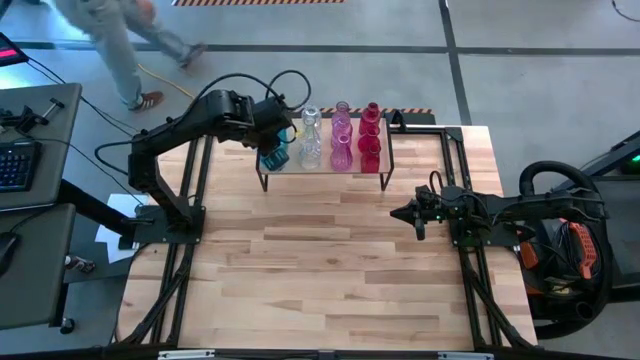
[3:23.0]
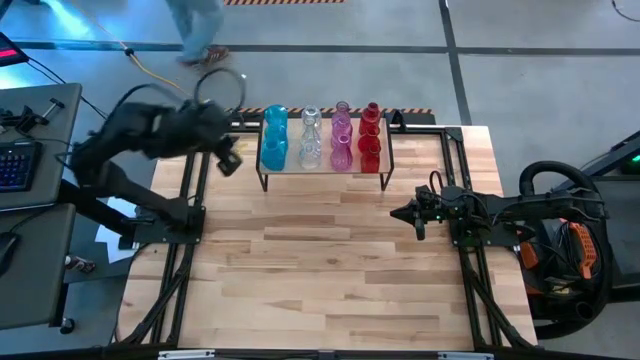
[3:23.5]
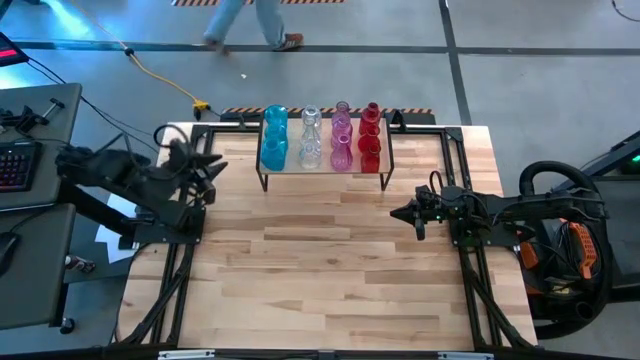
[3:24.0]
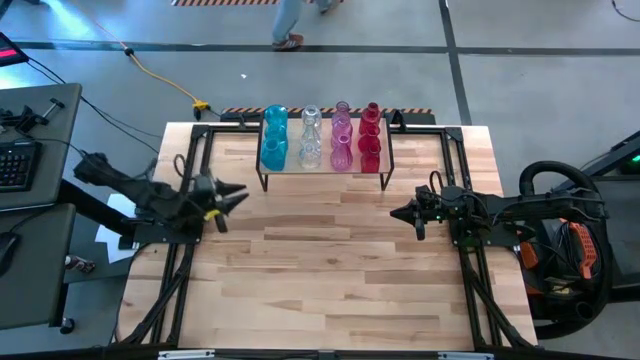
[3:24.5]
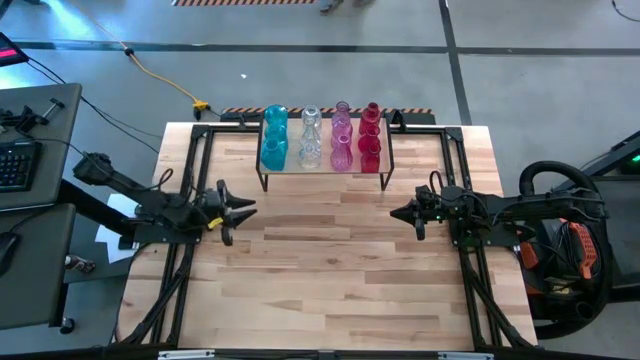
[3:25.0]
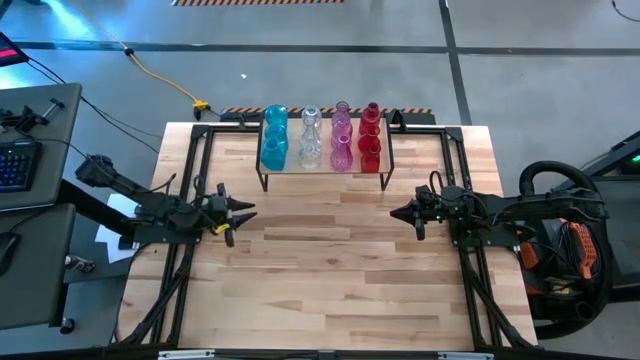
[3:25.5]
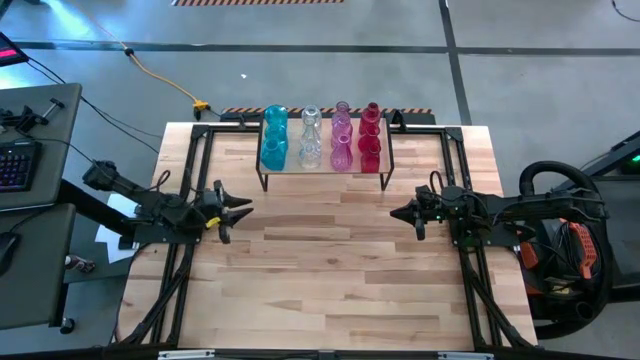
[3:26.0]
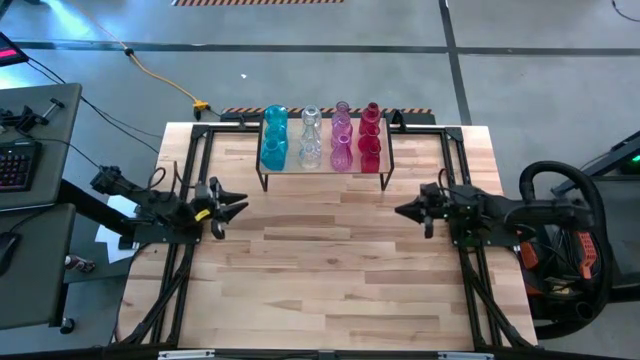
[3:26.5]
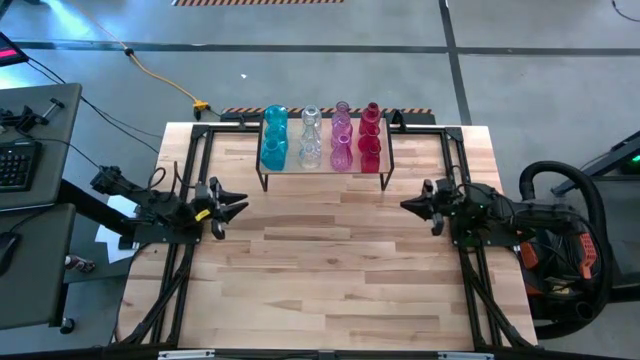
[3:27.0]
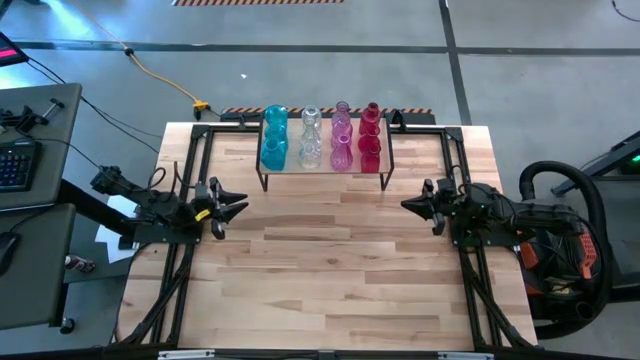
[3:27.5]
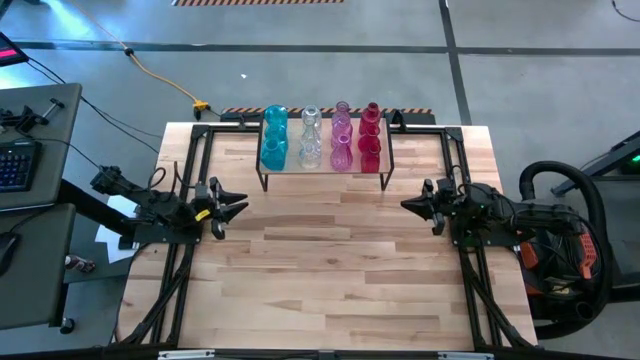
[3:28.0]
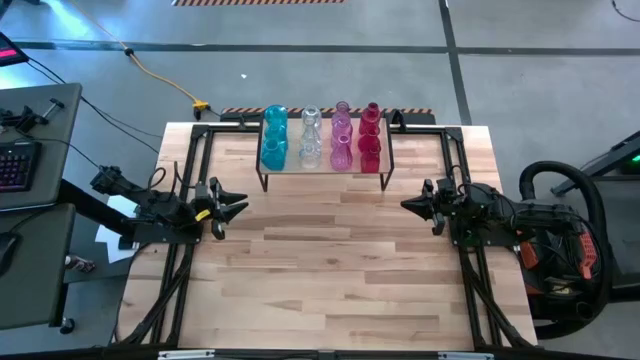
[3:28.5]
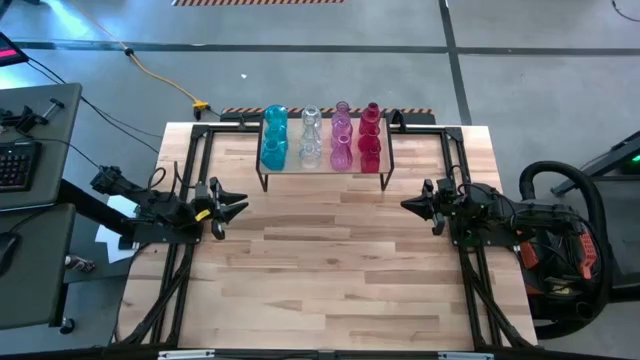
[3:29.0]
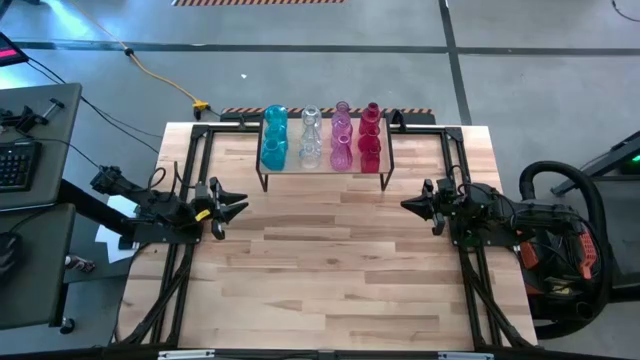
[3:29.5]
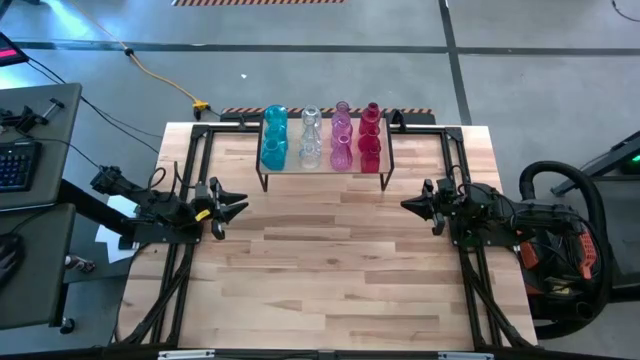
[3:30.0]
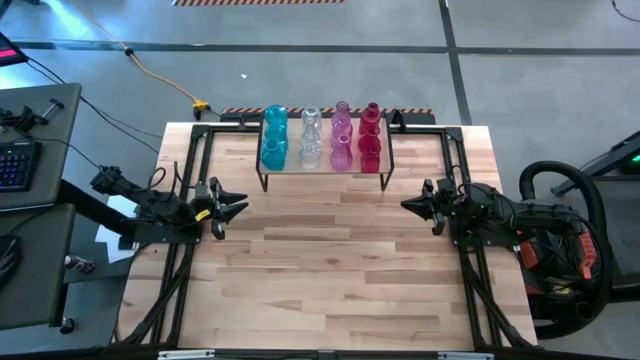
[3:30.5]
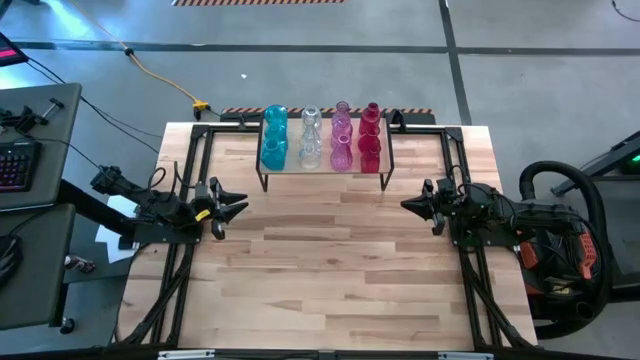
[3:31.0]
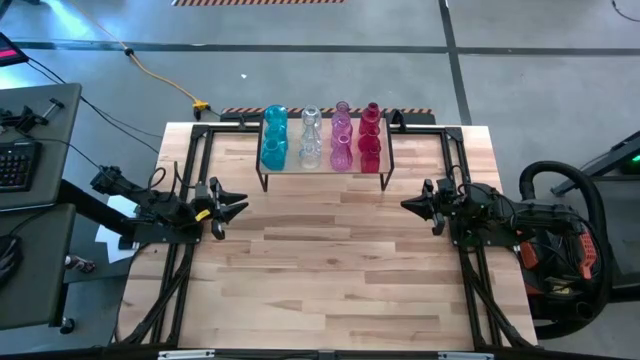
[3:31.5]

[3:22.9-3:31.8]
Task: sort vases onto shelf
Return to Home Position

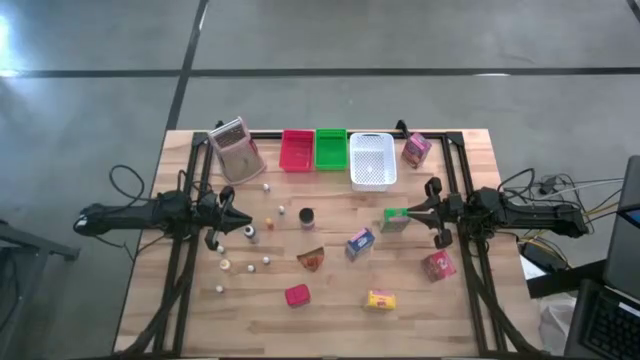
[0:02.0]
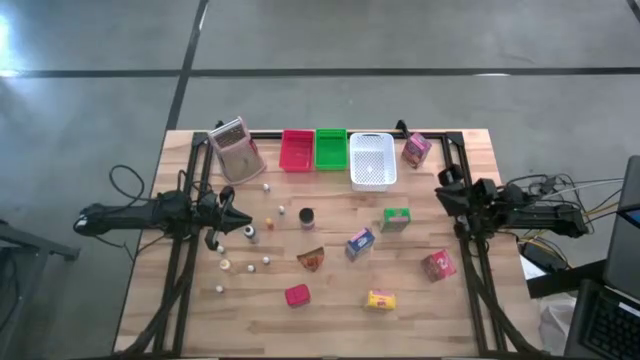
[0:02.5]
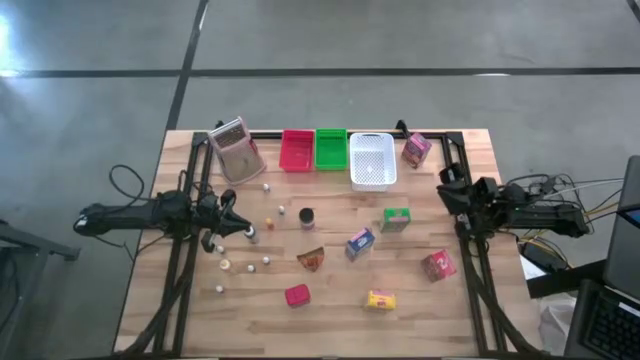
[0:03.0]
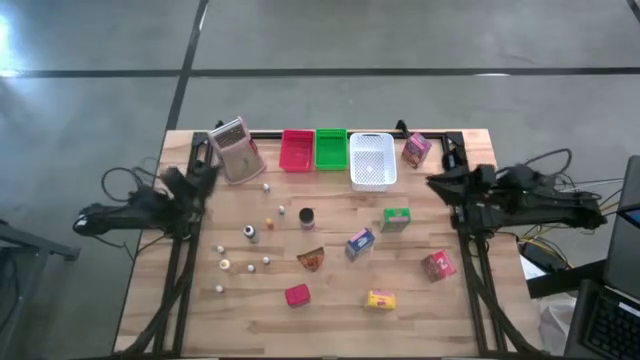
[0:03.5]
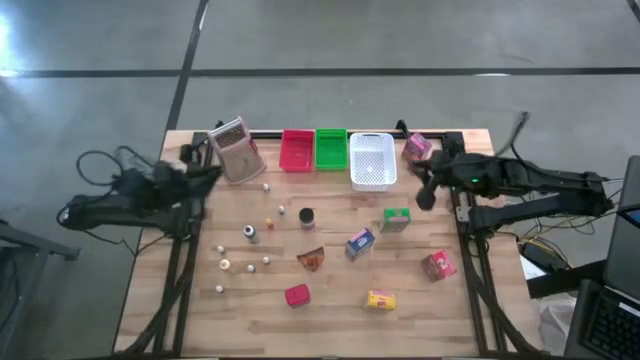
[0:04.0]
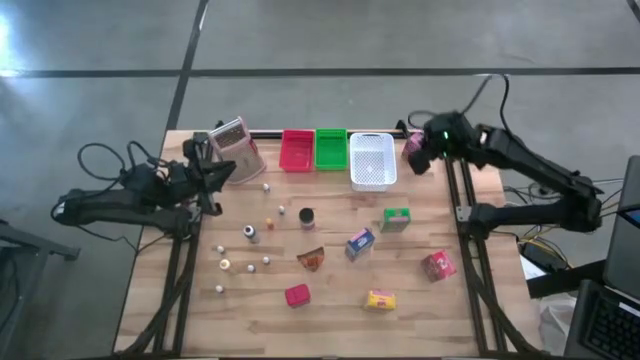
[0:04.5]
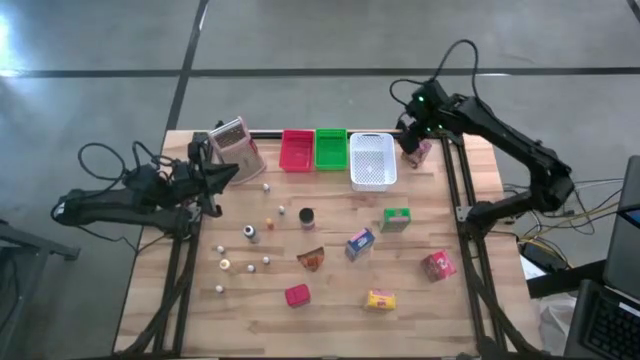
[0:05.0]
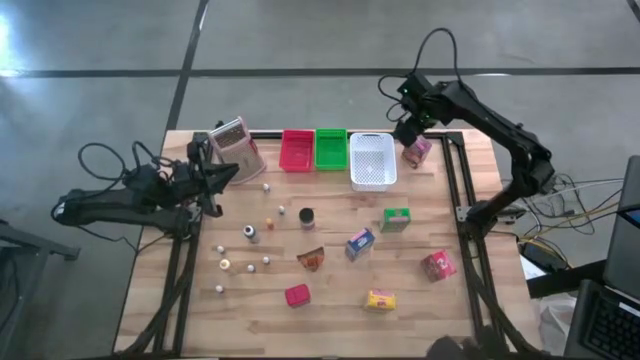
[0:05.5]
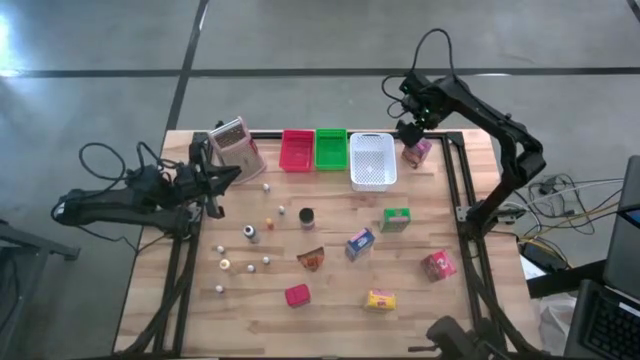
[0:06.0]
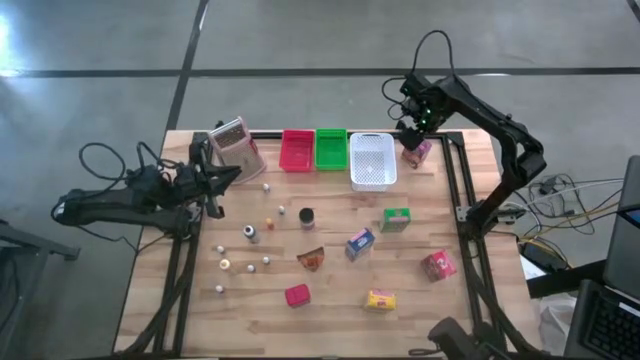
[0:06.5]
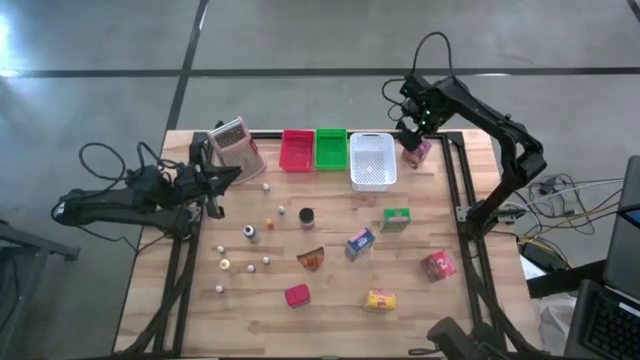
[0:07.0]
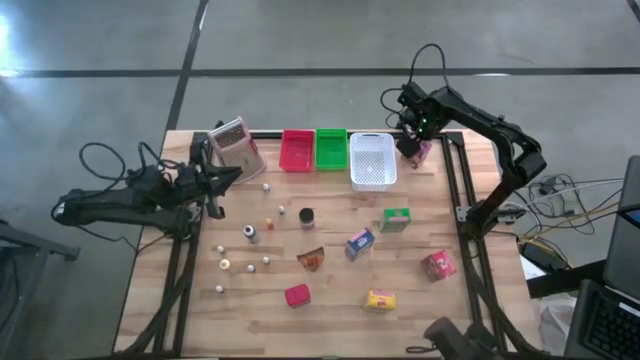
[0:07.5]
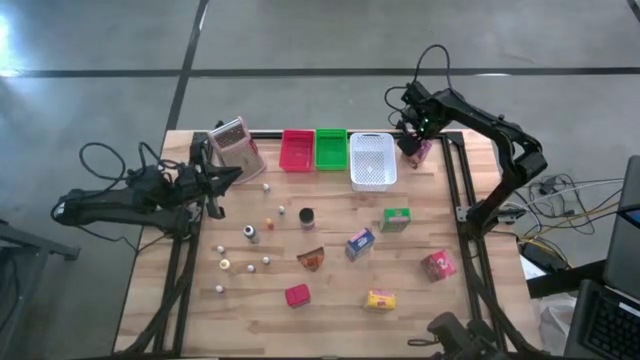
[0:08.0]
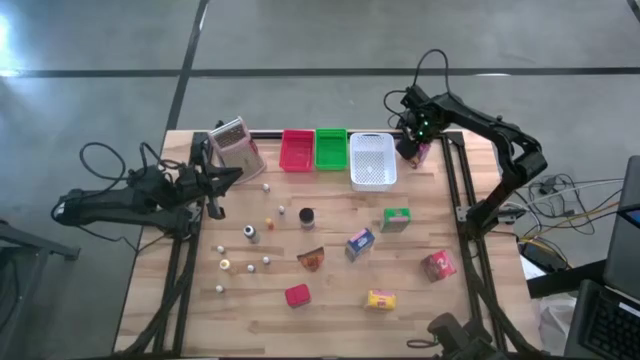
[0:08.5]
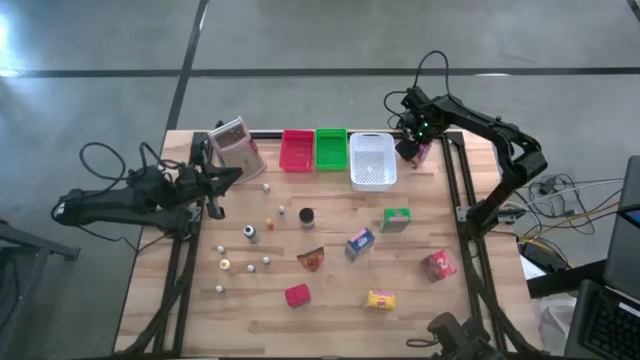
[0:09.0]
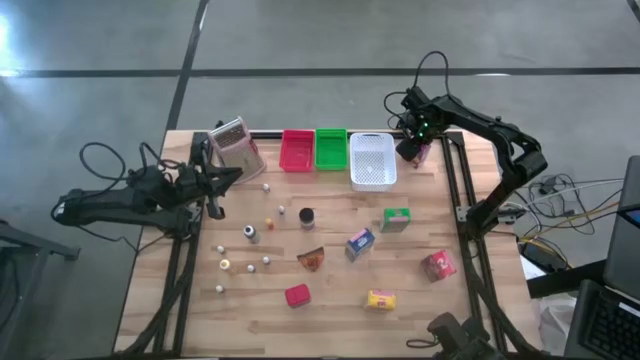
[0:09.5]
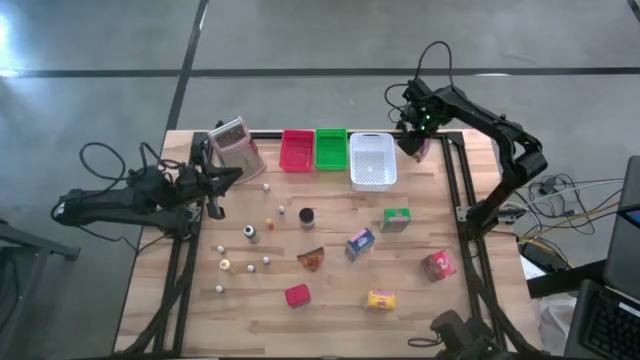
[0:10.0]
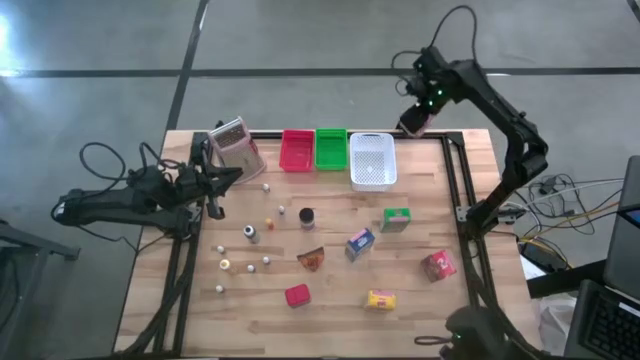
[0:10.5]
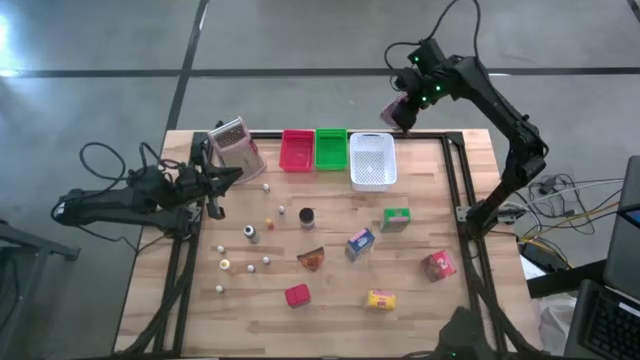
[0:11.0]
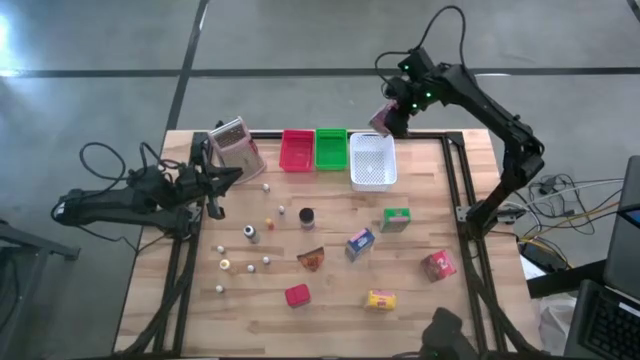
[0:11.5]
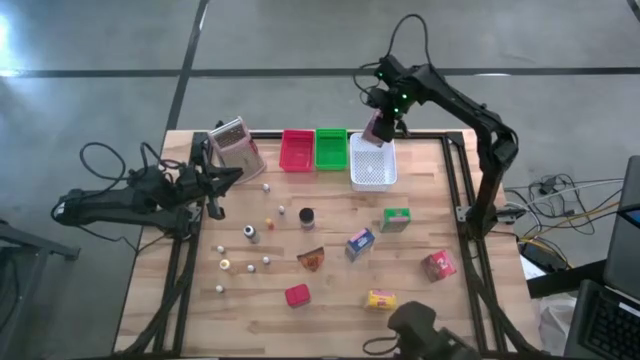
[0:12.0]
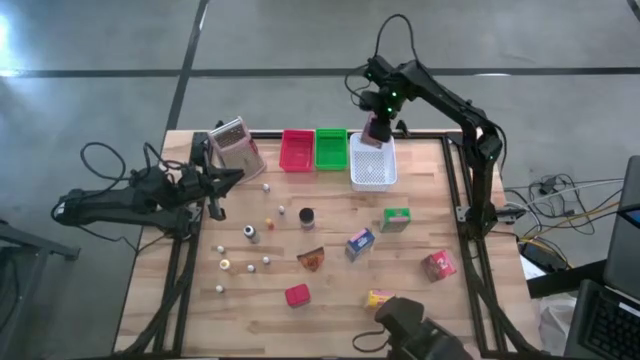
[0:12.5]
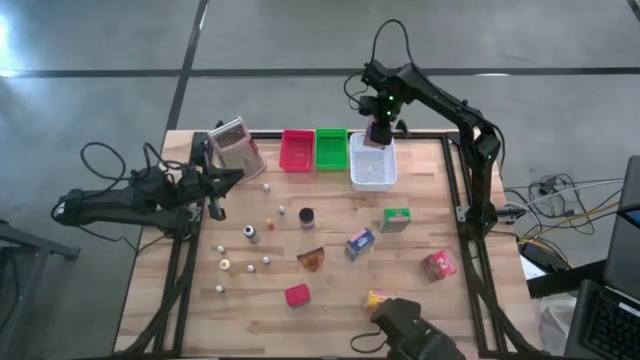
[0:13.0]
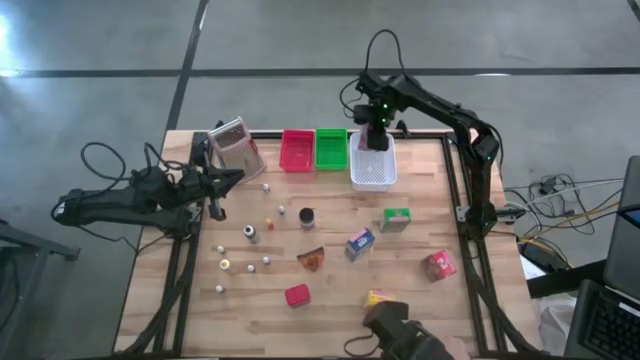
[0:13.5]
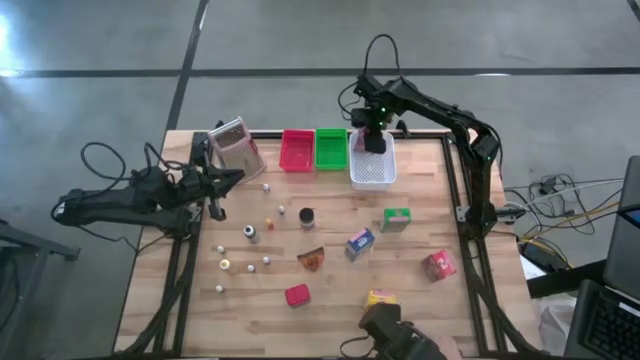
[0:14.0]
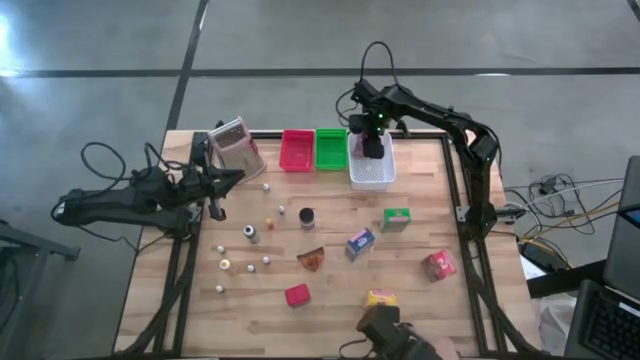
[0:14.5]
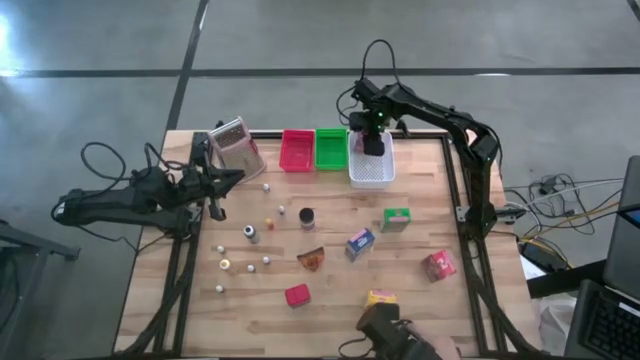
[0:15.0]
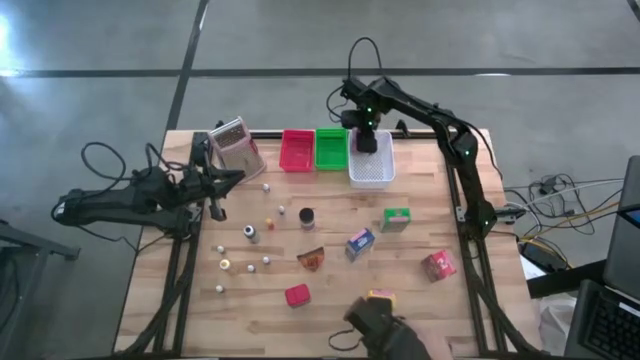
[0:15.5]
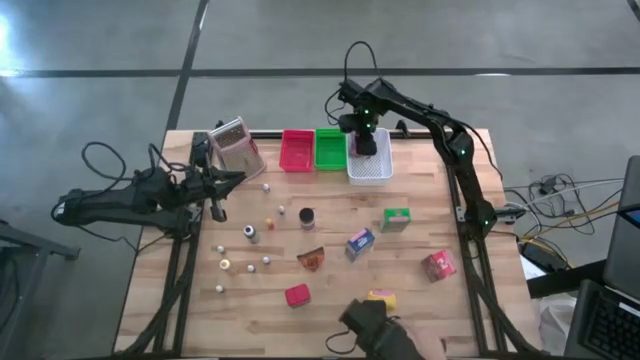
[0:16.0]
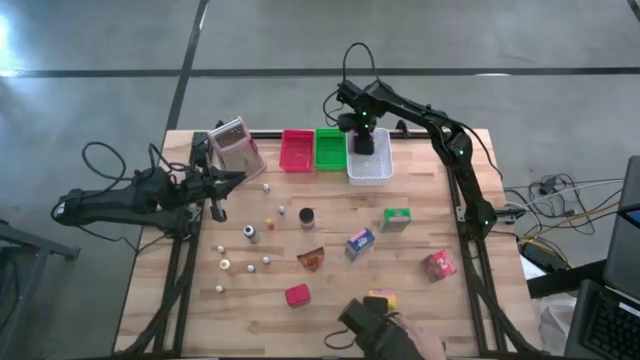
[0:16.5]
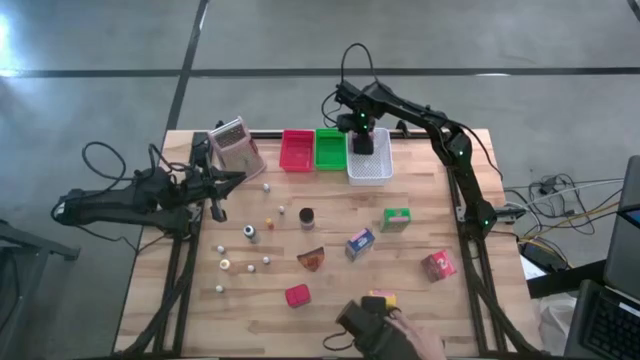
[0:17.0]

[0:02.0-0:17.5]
Task: Pick & Place Kitchen Items
Put the purple cereal box into the white bin
